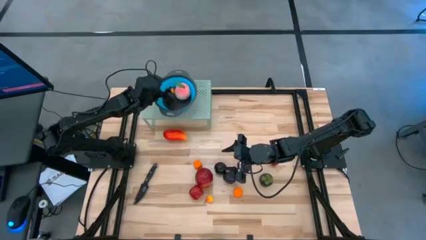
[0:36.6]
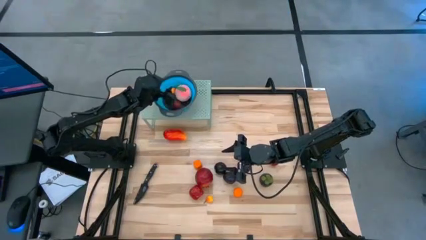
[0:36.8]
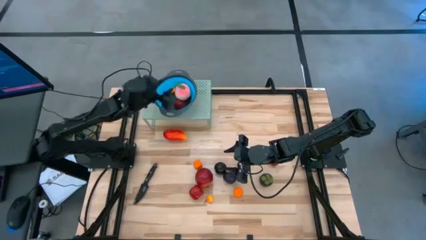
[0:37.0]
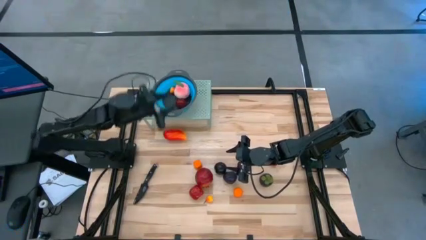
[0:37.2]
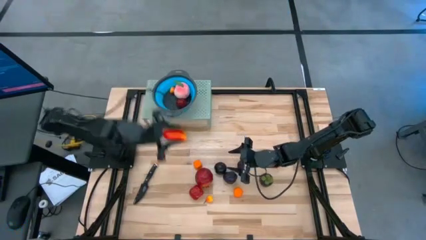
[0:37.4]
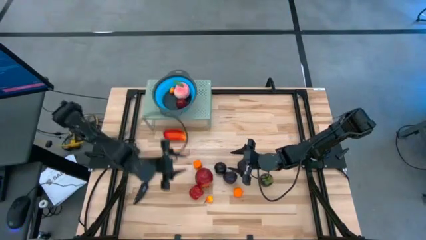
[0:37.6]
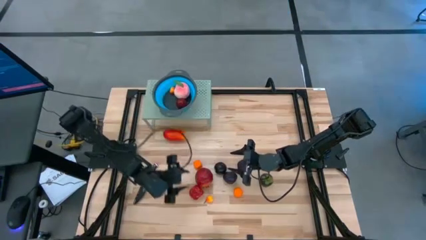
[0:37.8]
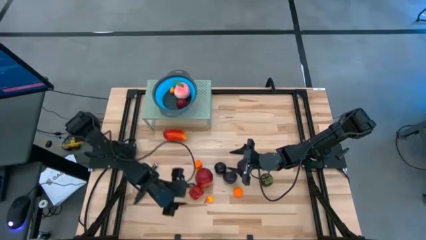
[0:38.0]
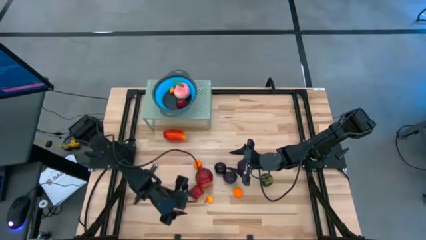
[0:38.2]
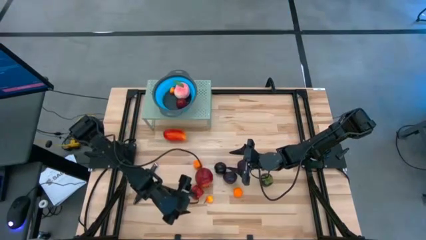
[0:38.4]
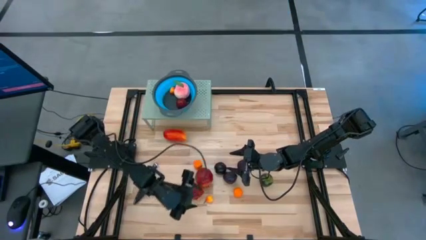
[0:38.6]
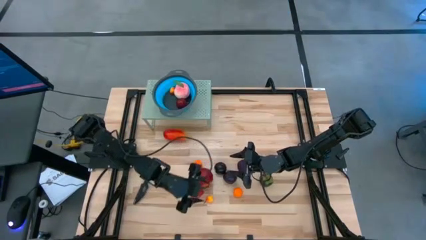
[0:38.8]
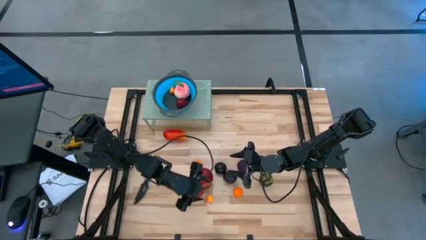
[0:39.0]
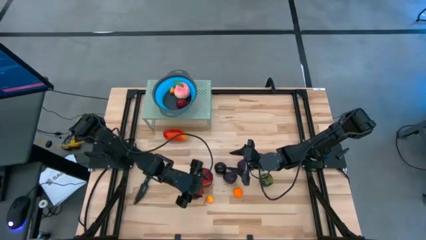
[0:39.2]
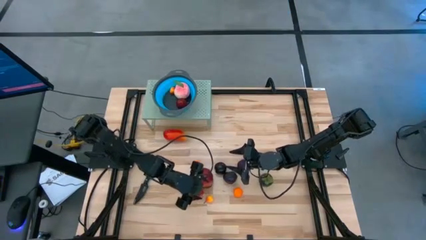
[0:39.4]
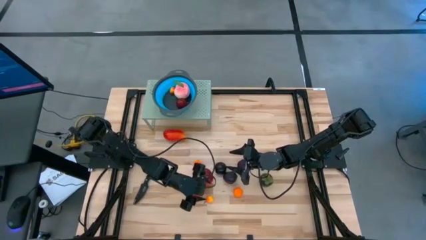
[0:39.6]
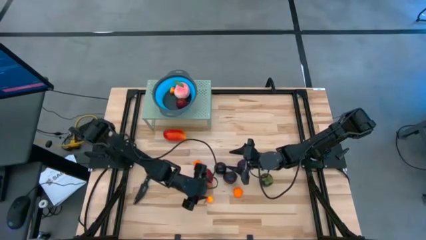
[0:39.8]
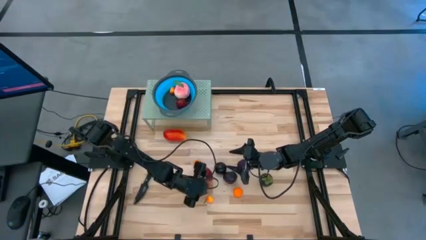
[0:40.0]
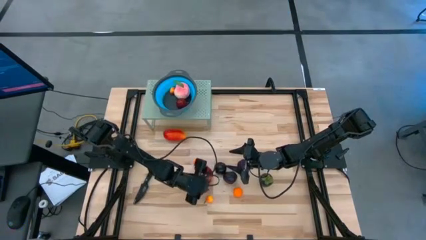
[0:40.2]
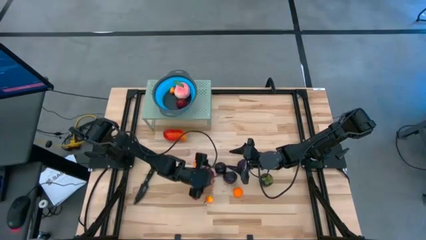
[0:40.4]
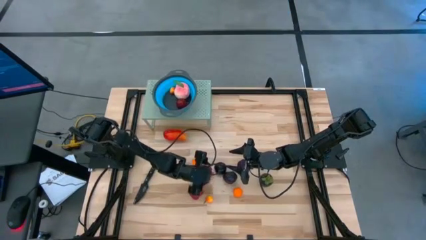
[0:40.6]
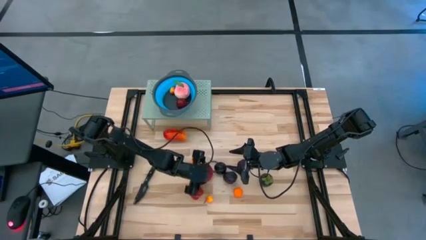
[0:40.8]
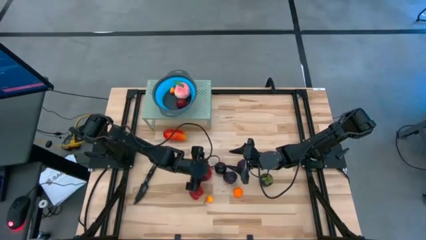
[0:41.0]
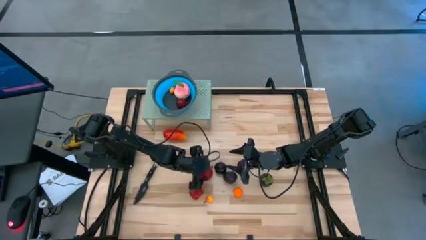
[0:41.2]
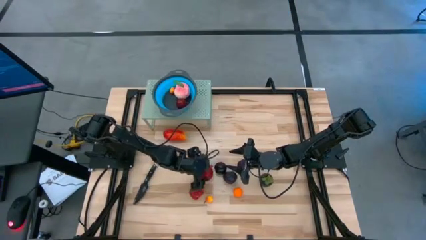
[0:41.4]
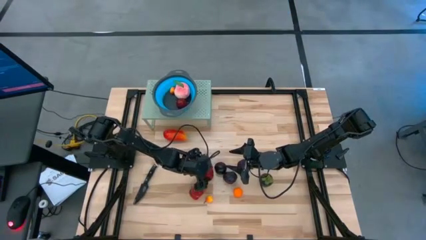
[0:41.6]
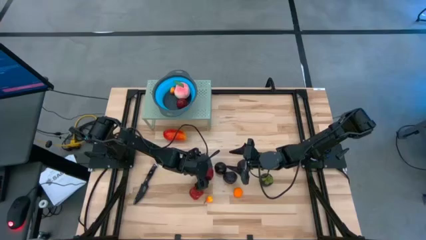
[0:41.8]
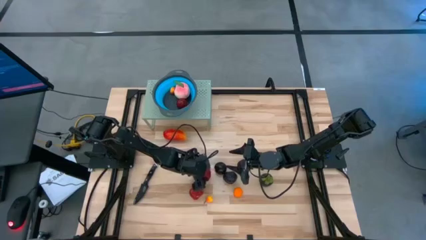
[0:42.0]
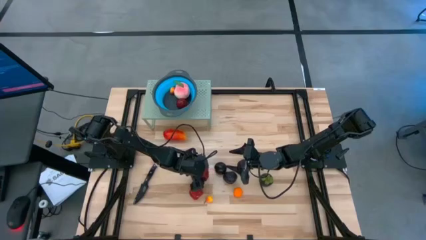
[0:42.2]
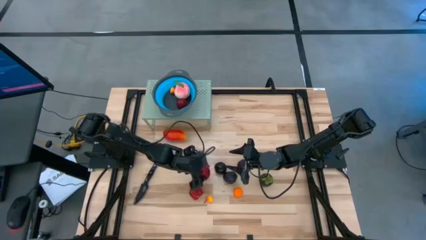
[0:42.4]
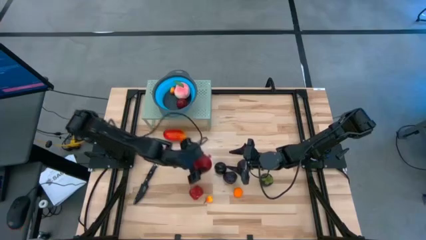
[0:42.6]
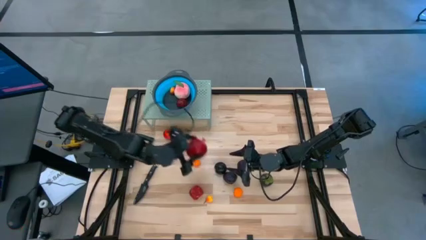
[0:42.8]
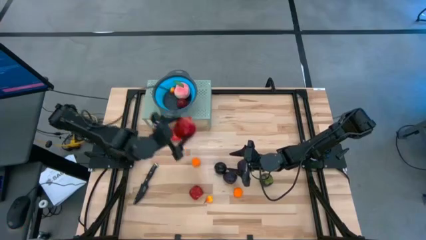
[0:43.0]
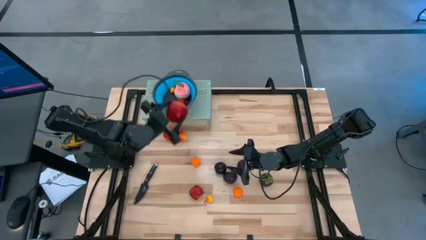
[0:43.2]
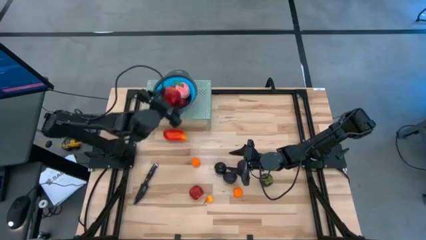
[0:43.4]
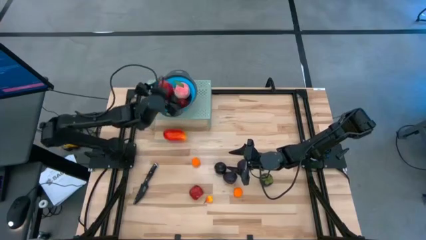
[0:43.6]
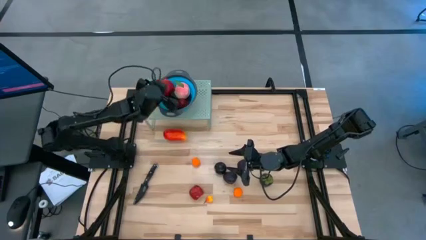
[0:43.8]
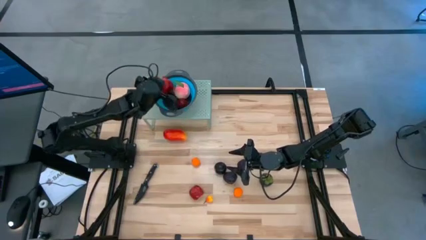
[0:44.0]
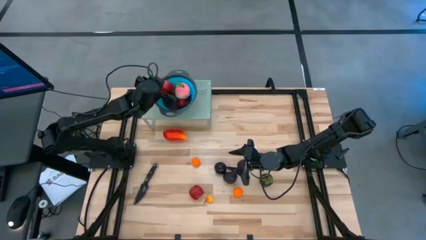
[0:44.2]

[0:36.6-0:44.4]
Task: Pick & Place Fruit
Put the left red pomegranate into the blue strainer bowl on the shelf

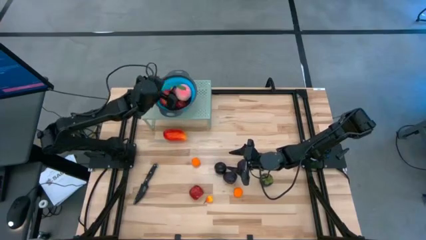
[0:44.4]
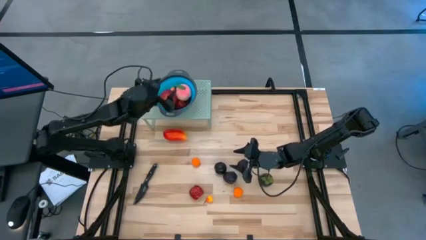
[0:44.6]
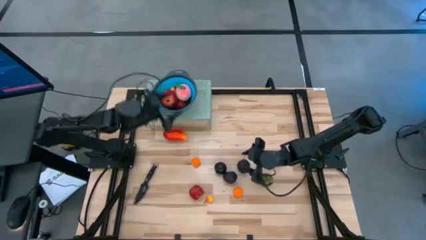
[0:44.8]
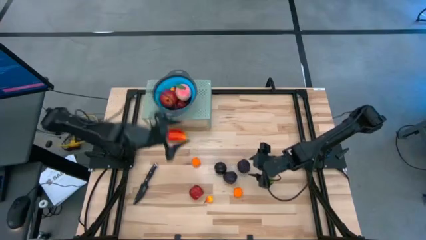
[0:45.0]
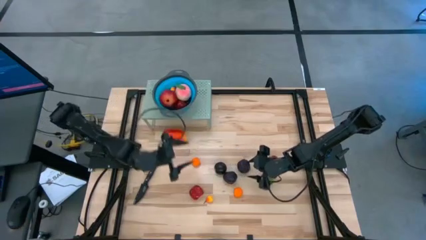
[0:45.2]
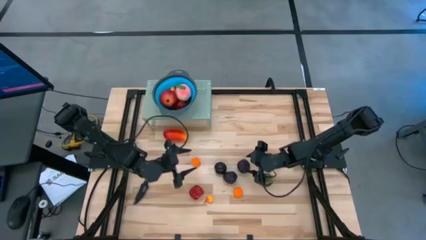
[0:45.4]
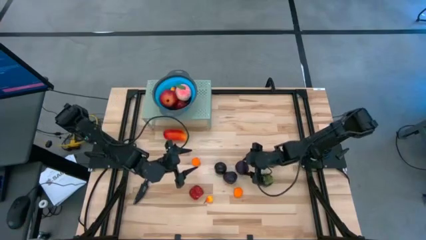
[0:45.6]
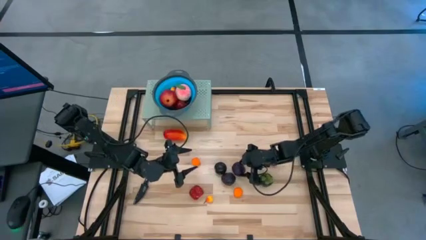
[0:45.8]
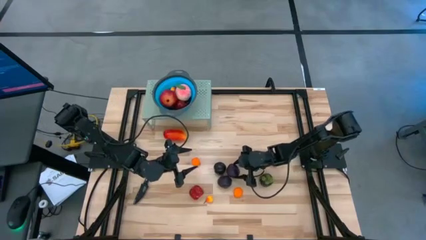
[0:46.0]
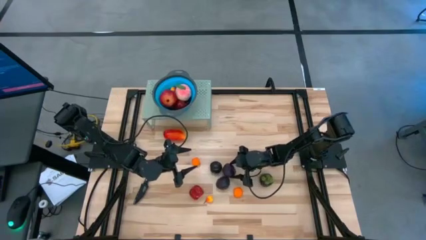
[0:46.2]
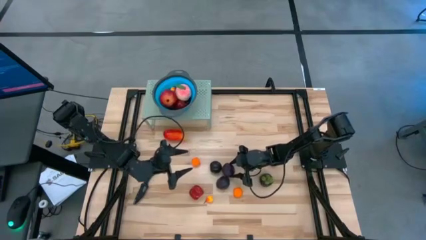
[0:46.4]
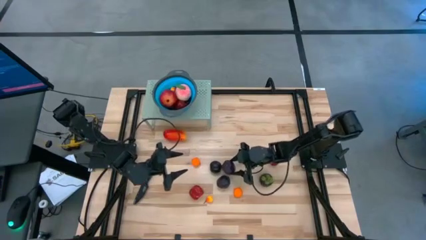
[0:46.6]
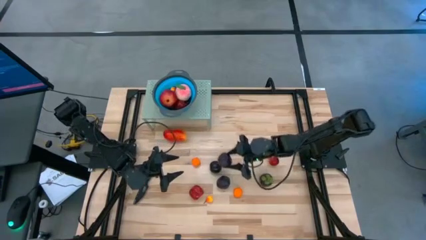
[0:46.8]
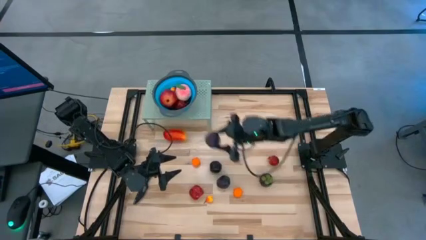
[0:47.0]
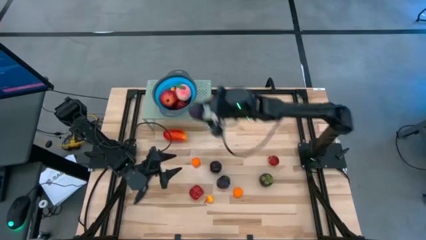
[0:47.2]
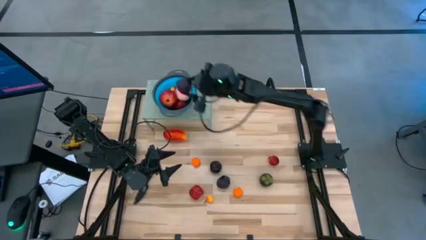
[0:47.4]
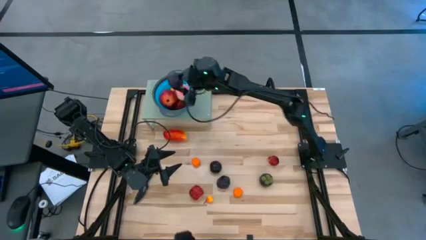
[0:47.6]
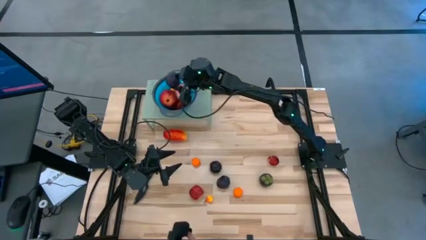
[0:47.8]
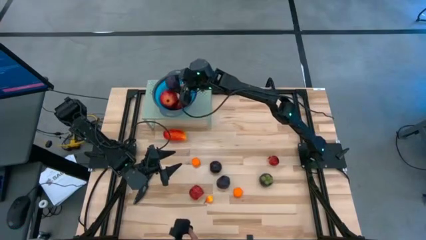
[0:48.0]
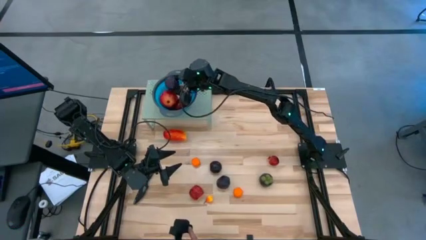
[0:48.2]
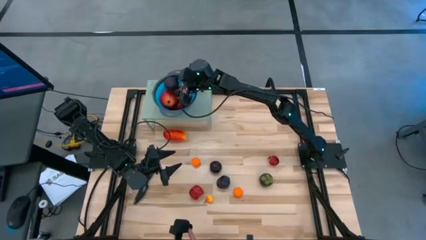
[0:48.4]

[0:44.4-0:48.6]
Put the right violet plum into the blue strainer bowl on the shelf

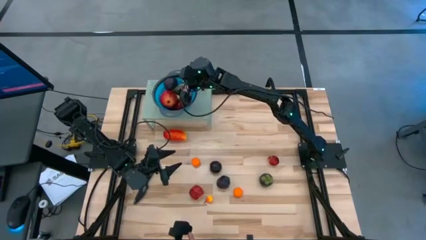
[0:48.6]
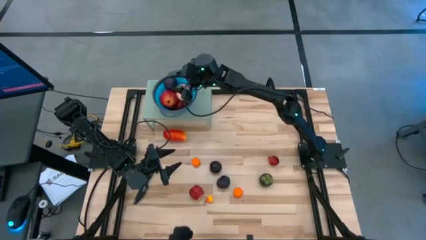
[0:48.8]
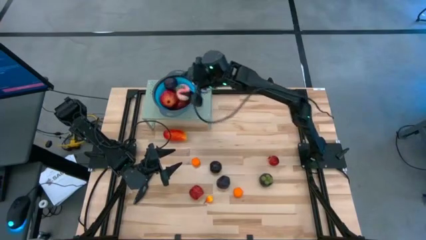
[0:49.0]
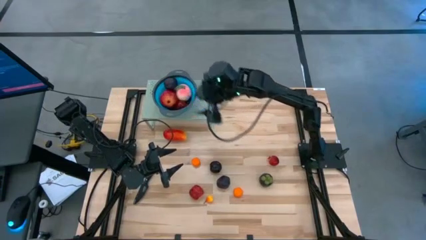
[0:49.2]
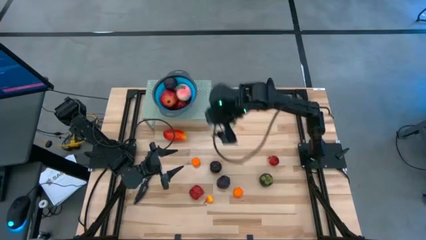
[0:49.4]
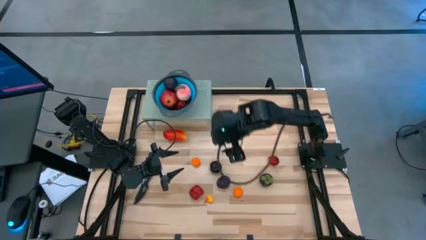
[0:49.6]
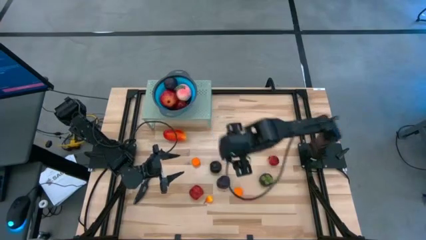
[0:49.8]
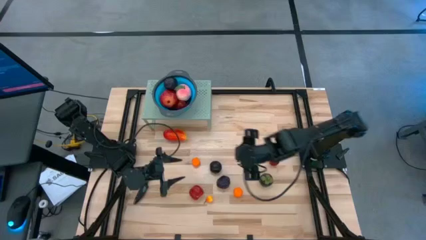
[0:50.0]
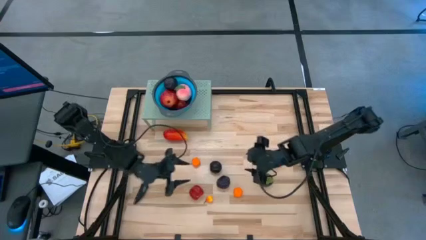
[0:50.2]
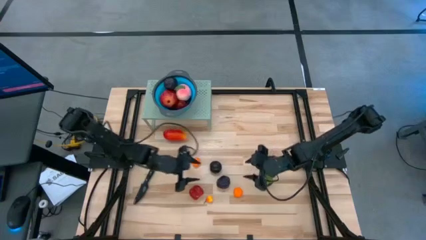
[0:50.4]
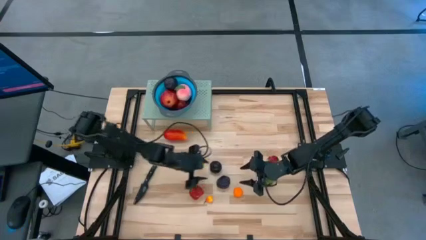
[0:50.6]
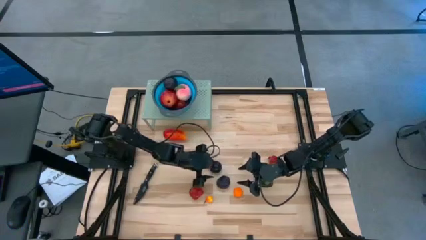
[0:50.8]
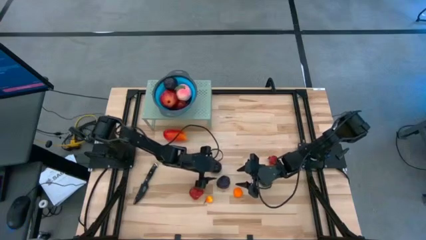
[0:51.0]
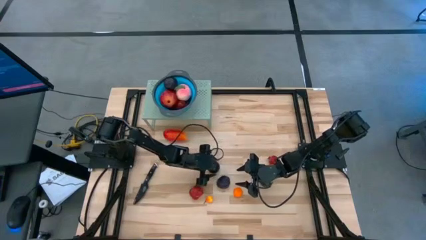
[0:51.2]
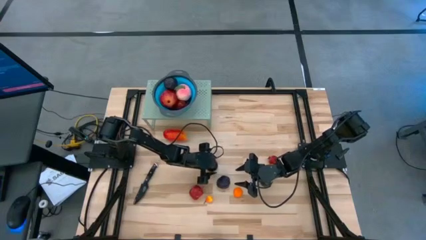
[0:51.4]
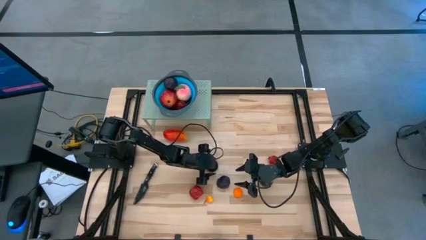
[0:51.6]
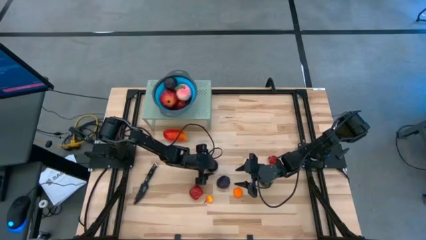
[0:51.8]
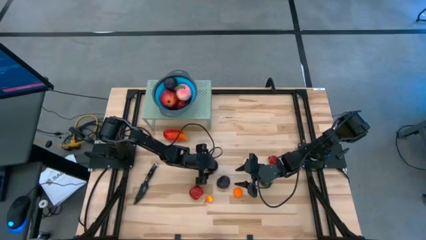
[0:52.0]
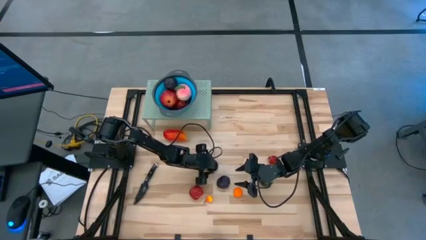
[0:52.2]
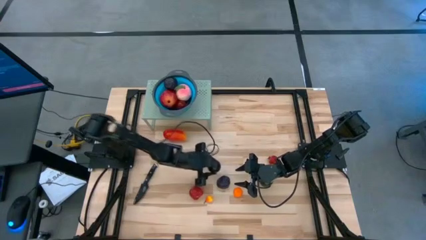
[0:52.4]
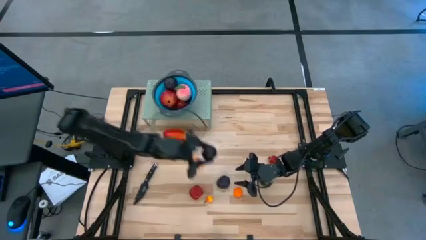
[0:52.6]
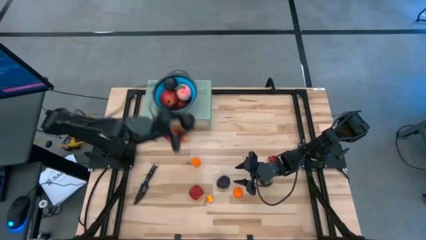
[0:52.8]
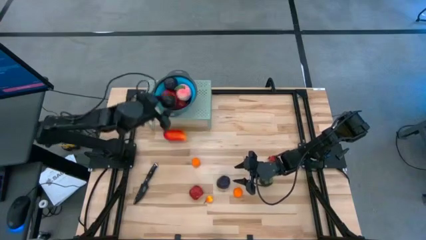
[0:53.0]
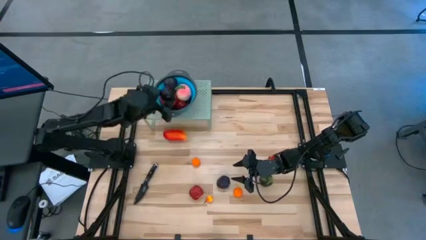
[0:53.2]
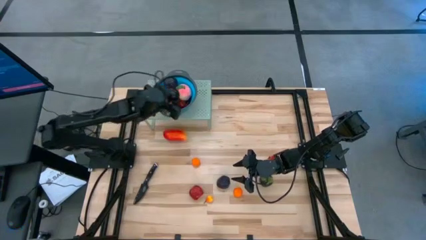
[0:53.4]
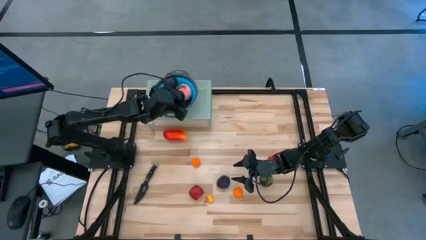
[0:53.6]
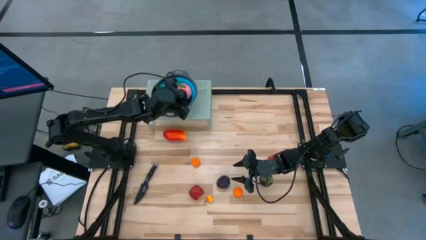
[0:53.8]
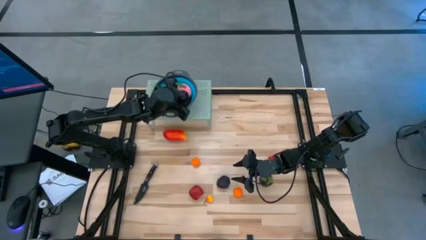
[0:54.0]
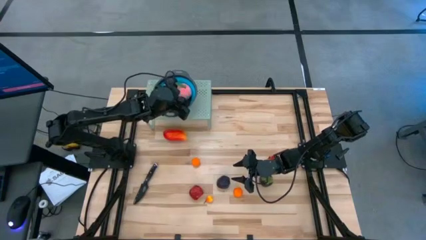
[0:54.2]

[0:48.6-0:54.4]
Put the top violet plum into the blue strainer bowl on the shelf
